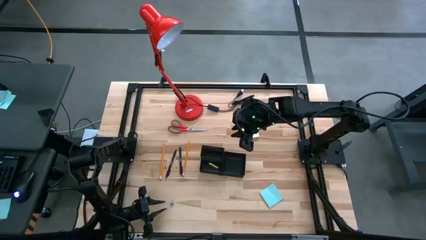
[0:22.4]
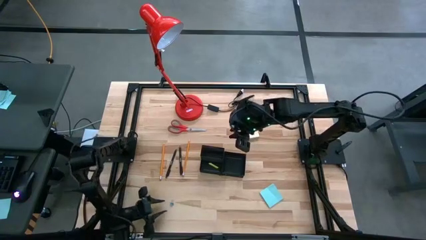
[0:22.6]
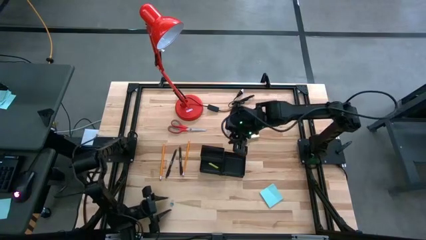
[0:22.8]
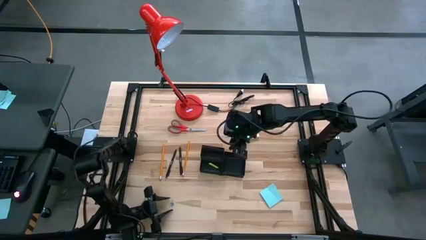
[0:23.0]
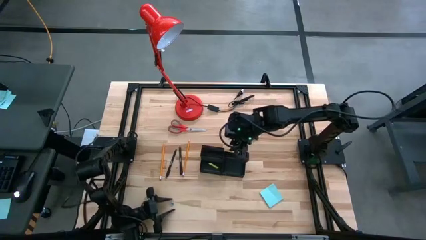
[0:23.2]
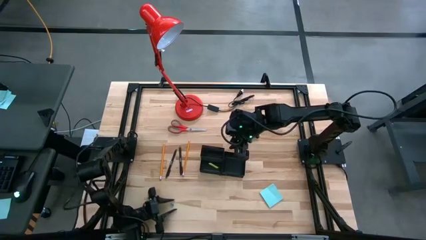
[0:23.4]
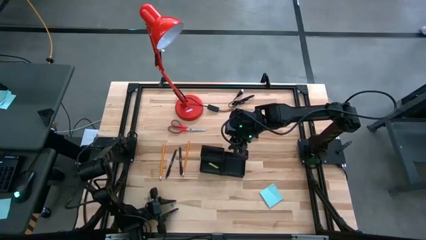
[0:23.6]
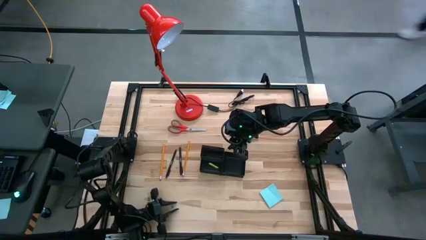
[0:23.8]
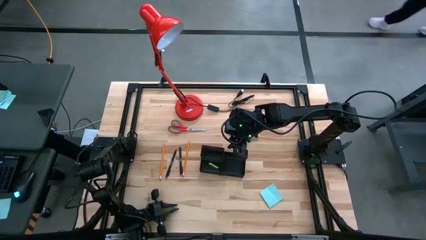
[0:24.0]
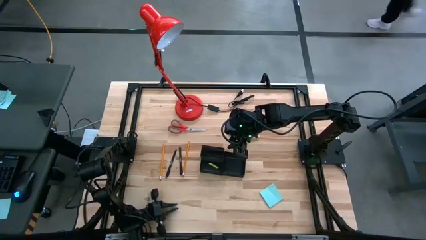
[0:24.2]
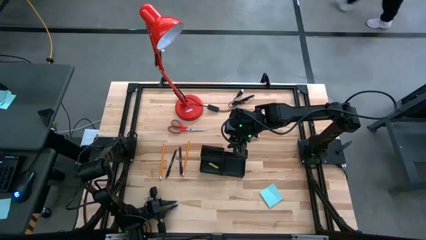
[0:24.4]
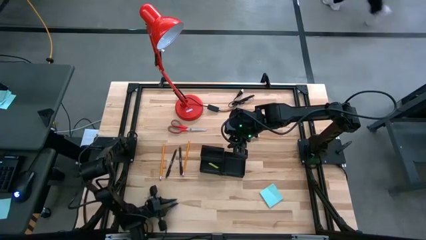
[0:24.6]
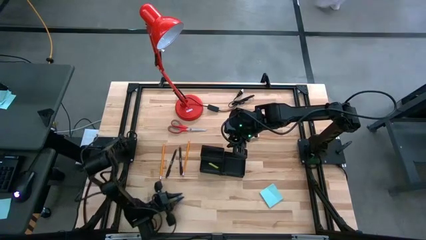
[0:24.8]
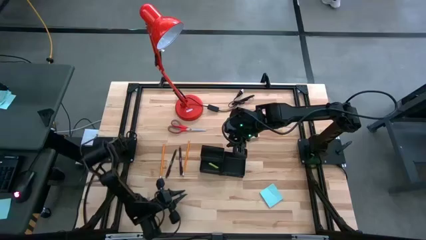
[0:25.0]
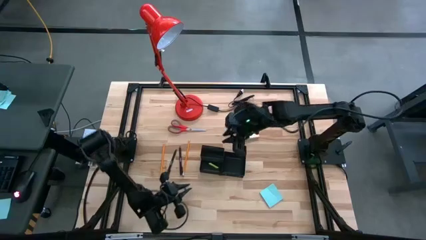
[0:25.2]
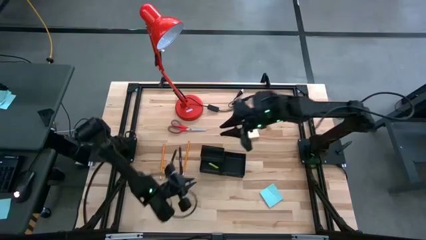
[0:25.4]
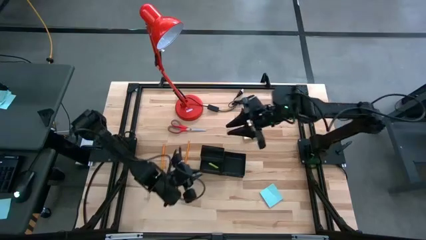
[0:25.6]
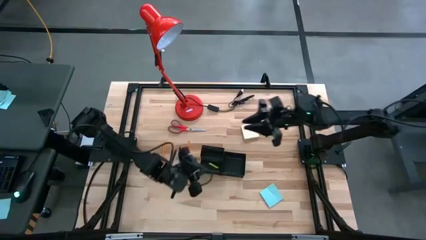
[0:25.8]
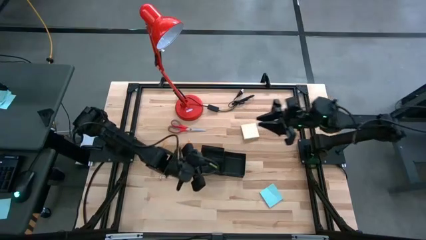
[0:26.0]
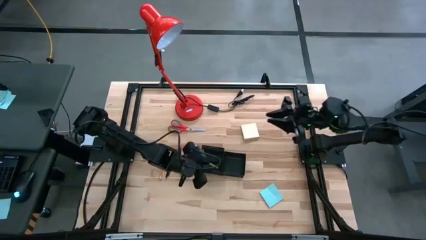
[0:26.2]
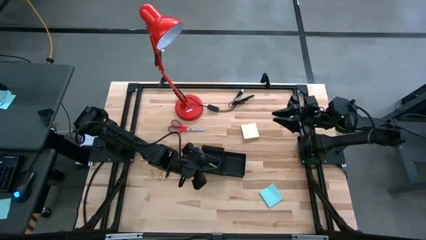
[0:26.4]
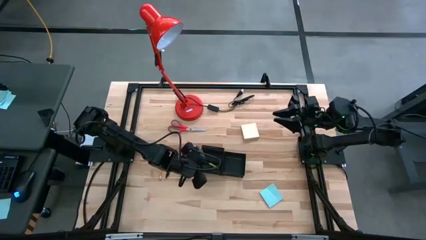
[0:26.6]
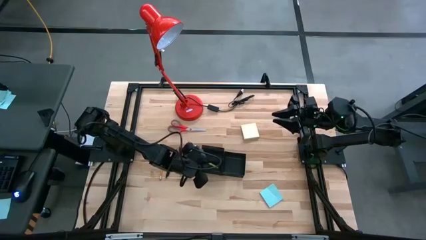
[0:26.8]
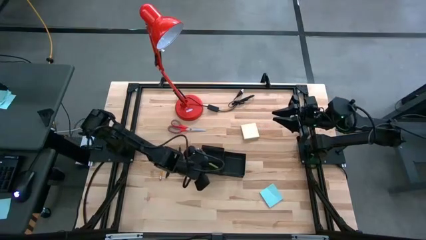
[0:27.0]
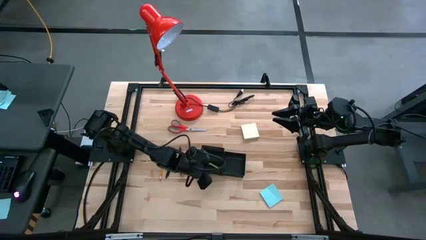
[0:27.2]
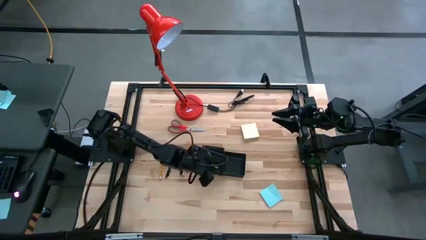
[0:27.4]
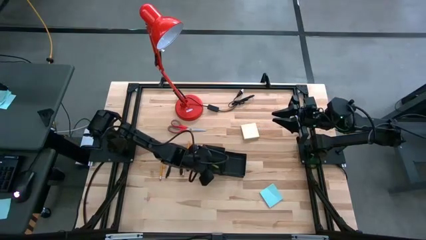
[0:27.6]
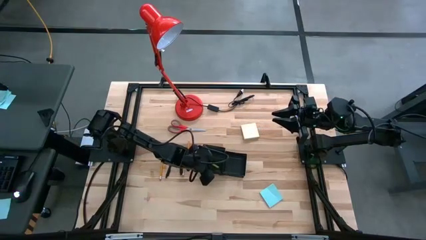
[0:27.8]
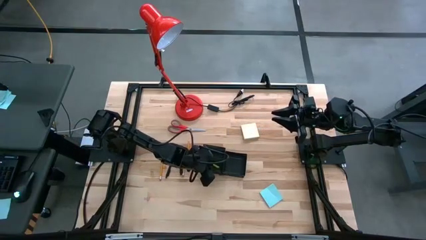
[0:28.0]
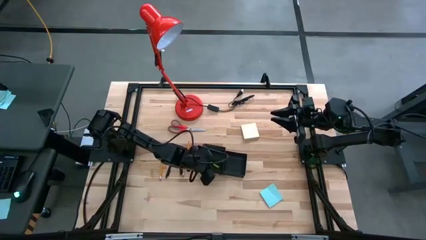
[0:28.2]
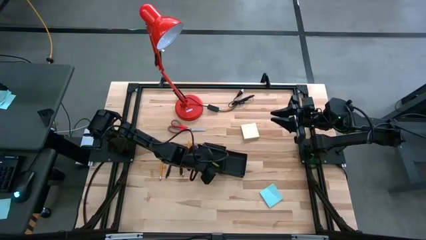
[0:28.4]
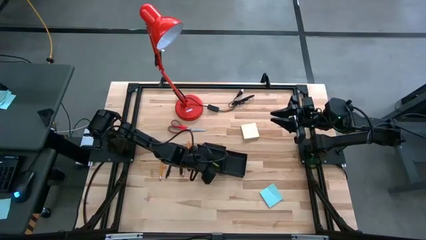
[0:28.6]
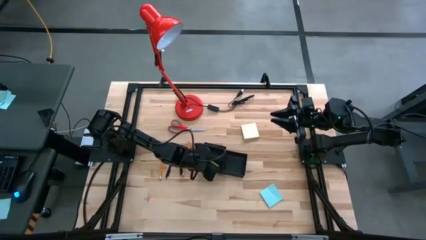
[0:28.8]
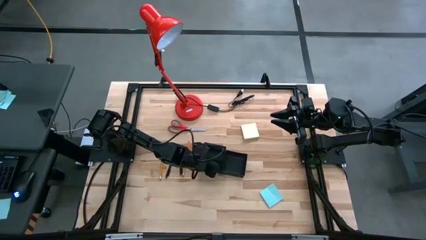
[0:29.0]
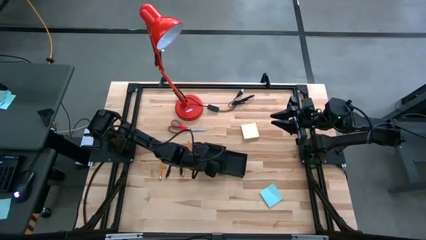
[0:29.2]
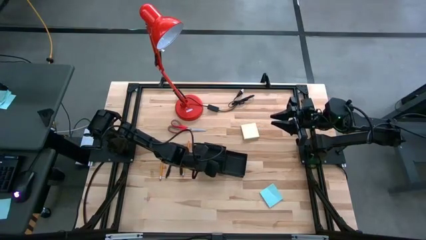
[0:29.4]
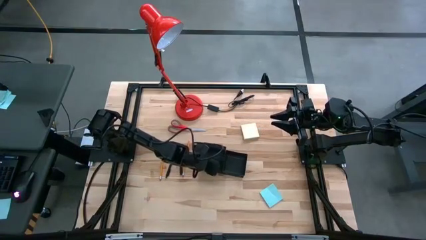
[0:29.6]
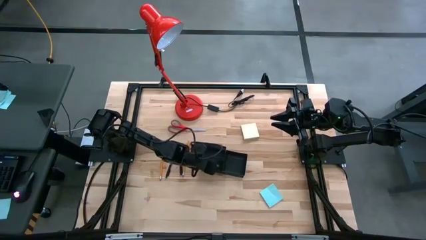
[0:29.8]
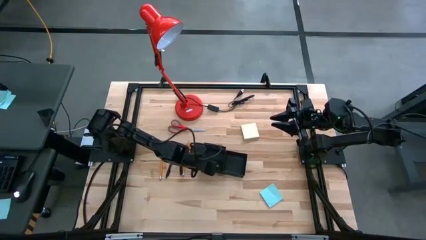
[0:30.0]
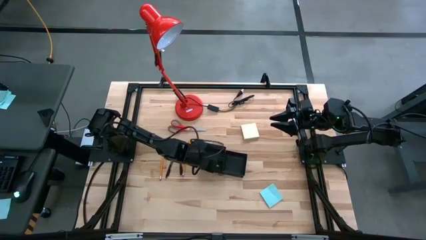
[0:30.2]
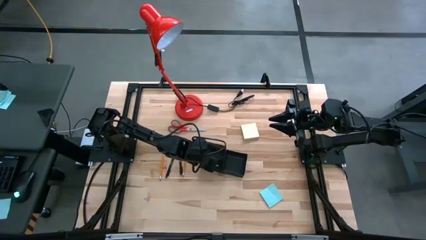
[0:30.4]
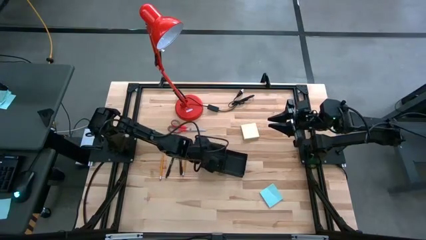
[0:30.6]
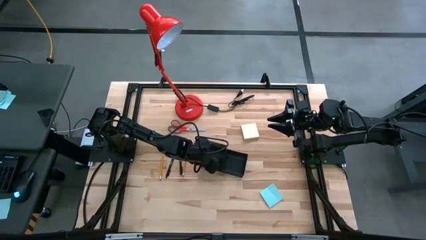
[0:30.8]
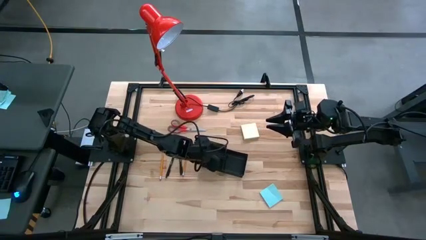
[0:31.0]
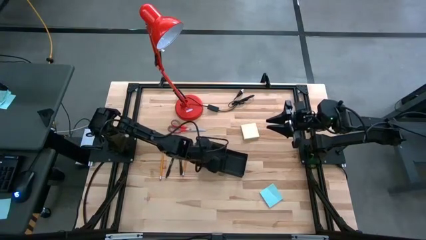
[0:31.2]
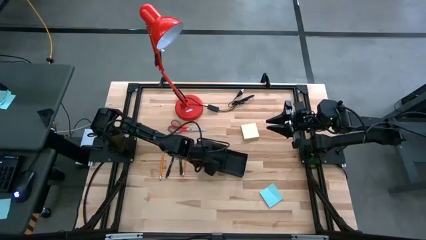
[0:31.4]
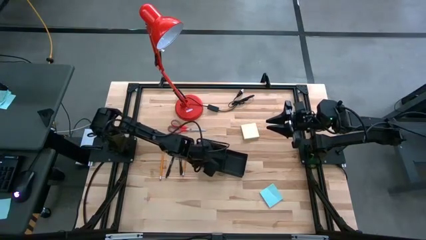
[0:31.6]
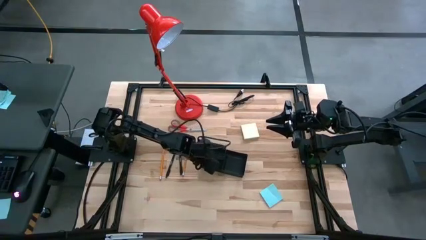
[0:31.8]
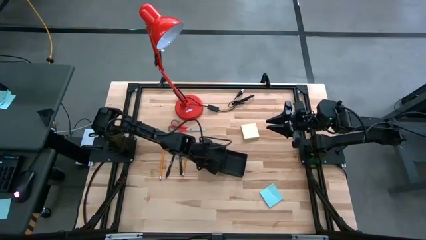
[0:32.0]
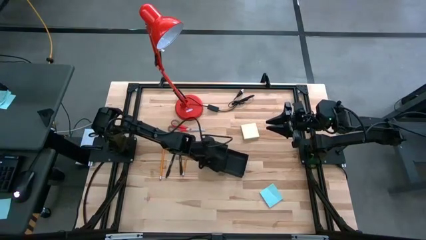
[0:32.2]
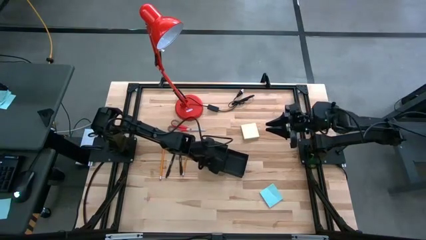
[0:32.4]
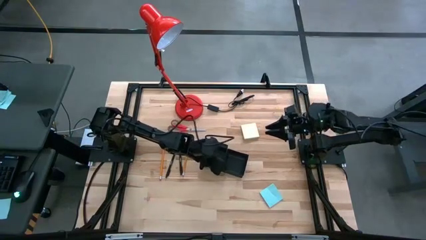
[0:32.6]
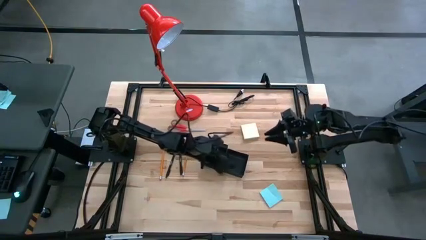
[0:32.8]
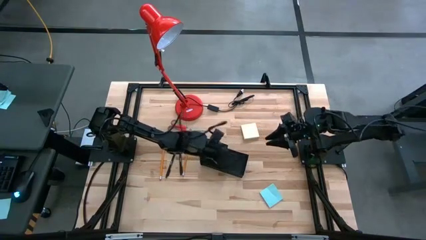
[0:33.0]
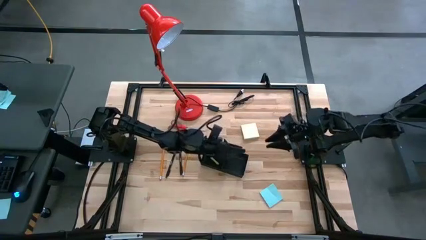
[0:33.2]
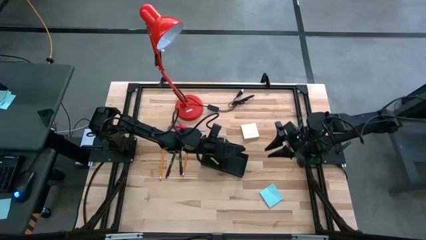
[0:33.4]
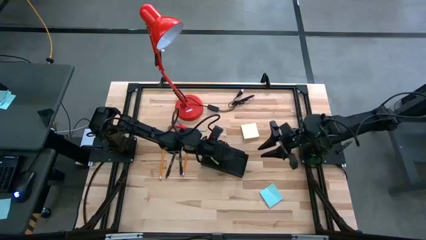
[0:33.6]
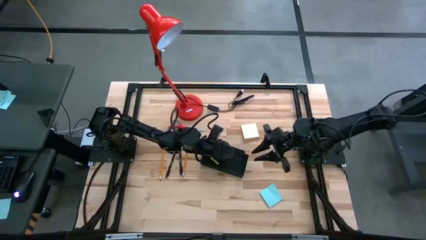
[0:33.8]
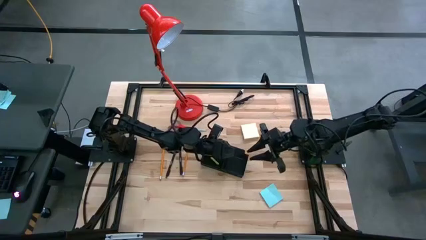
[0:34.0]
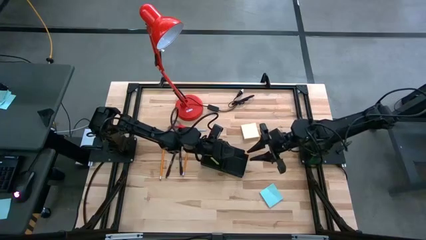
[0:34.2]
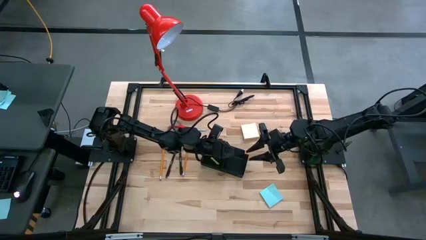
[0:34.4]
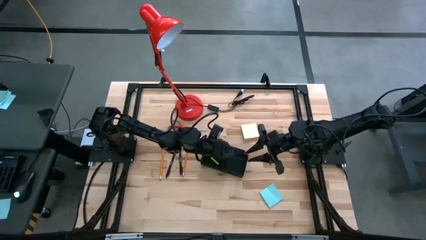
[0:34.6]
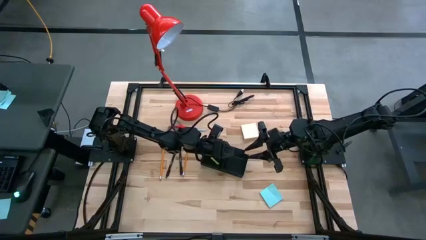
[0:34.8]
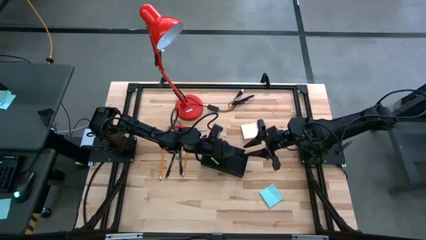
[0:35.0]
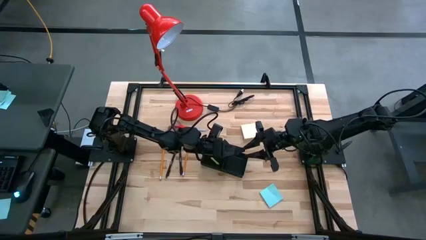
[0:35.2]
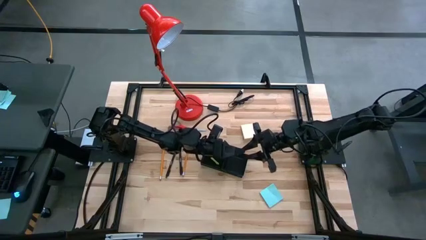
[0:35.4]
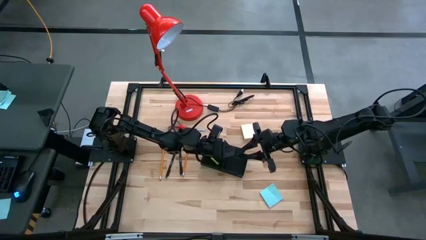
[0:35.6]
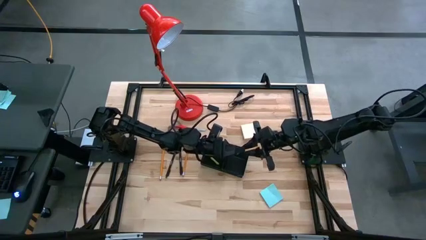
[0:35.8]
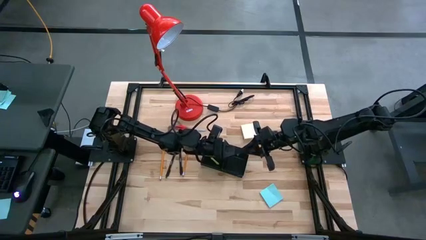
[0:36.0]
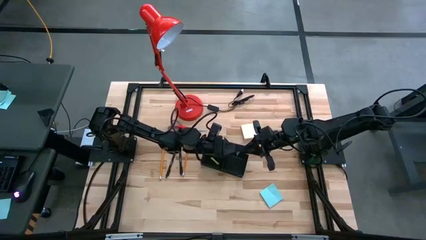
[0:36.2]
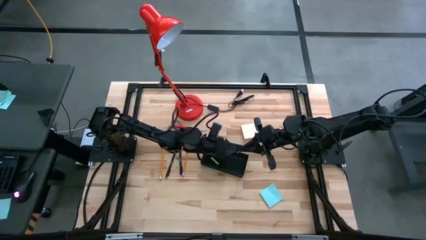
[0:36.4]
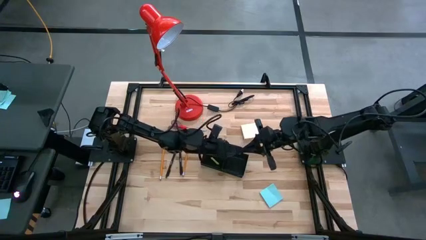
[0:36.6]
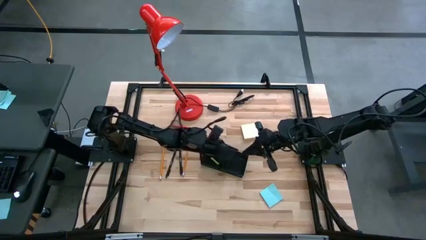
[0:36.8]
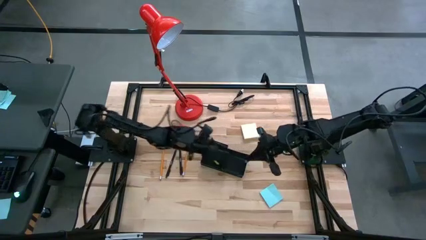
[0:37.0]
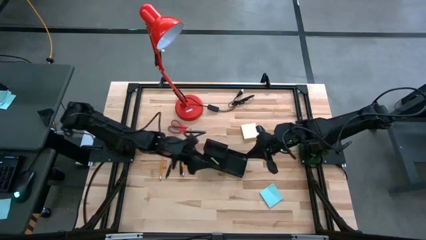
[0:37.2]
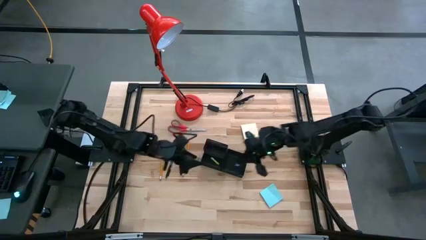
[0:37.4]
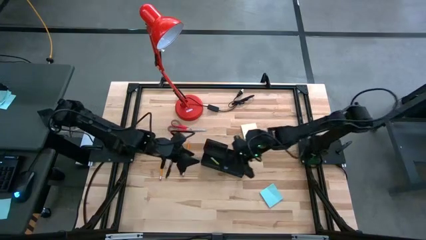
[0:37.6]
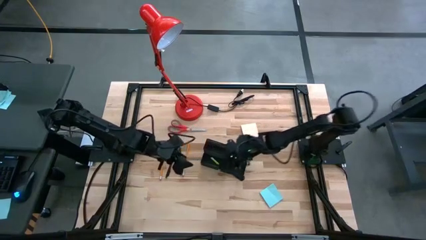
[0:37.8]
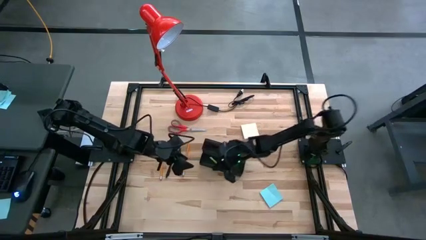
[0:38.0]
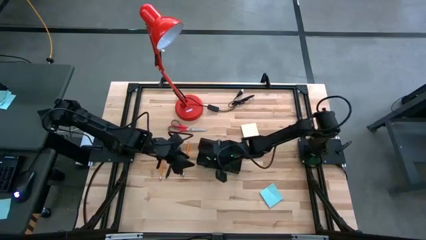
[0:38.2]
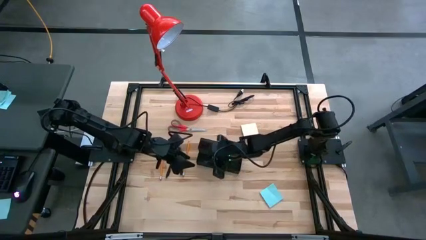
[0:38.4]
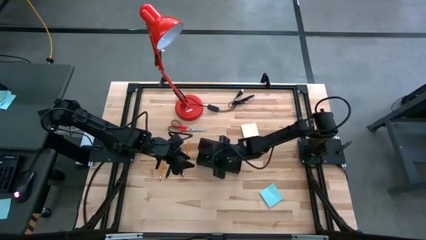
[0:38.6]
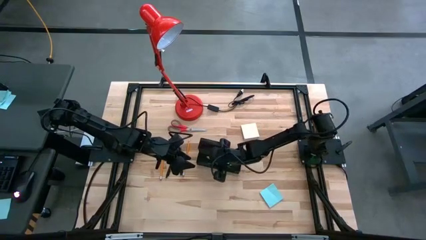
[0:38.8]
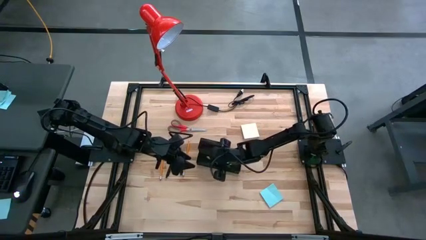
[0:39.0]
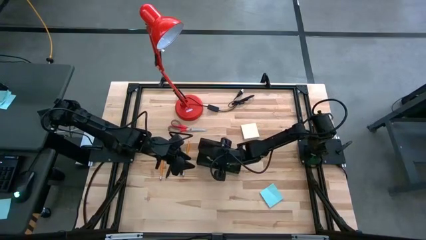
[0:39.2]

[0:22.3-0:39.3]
Task: Pick and place office supplies into organizer
Put the blue binder clip into the black desk organizer
